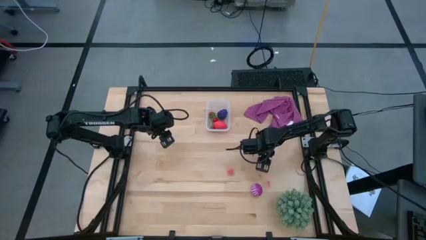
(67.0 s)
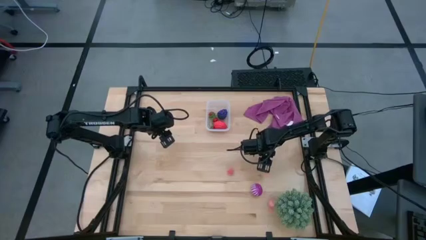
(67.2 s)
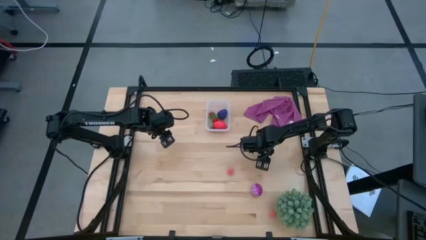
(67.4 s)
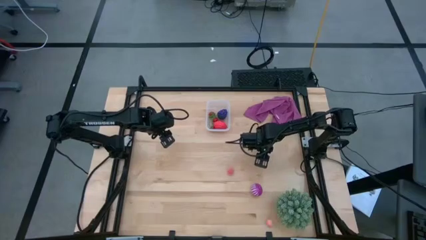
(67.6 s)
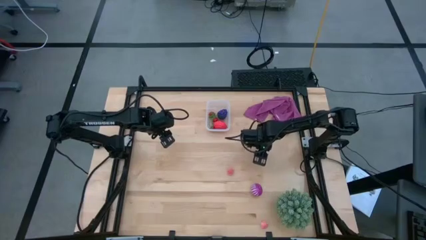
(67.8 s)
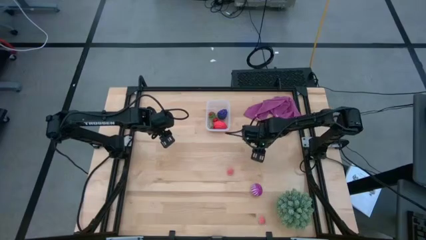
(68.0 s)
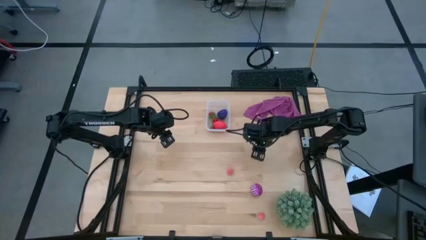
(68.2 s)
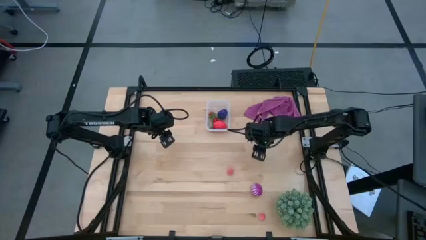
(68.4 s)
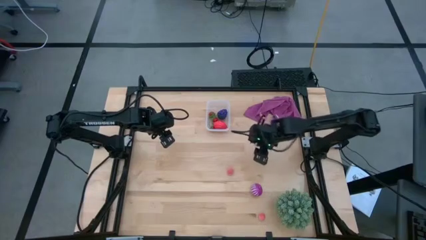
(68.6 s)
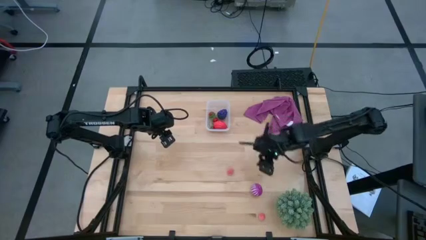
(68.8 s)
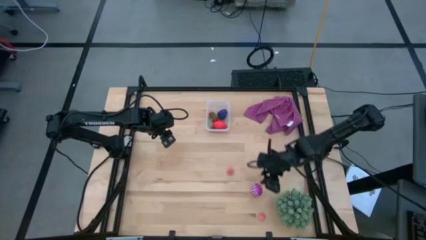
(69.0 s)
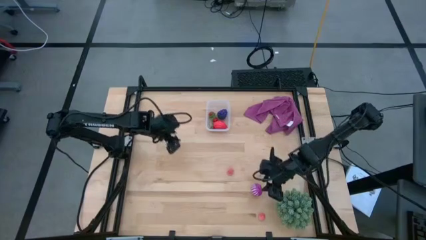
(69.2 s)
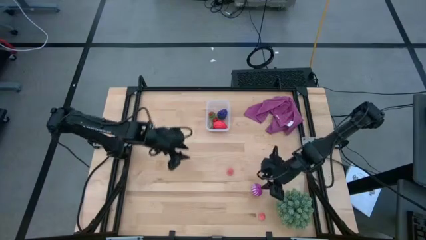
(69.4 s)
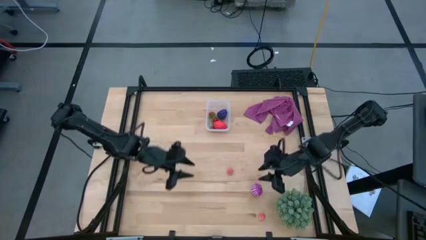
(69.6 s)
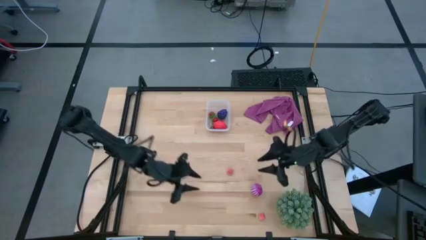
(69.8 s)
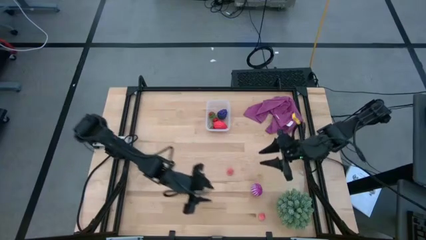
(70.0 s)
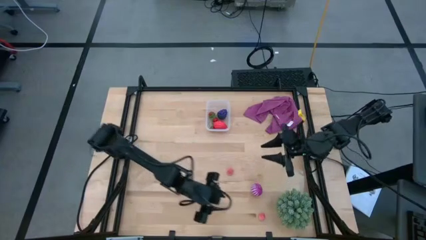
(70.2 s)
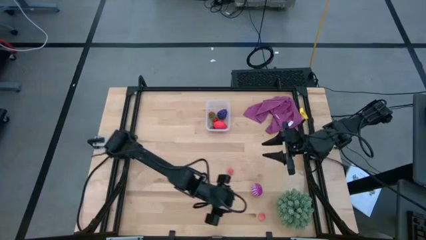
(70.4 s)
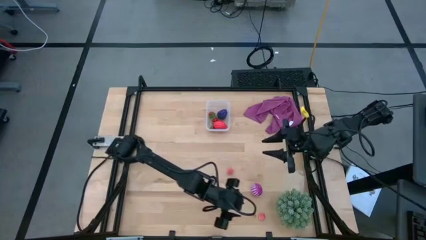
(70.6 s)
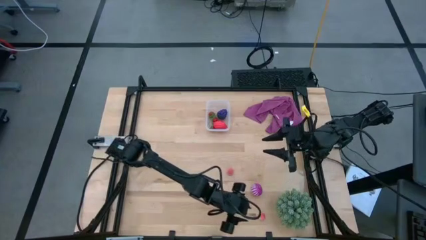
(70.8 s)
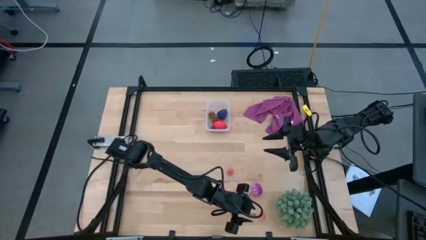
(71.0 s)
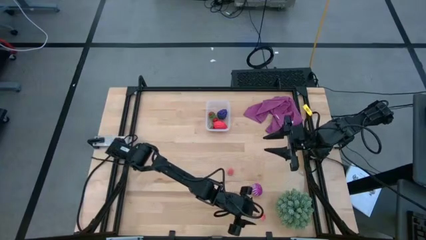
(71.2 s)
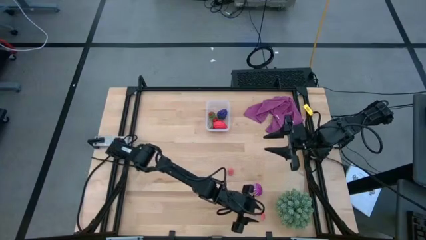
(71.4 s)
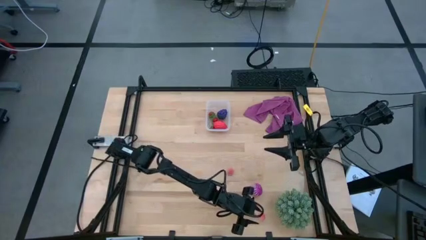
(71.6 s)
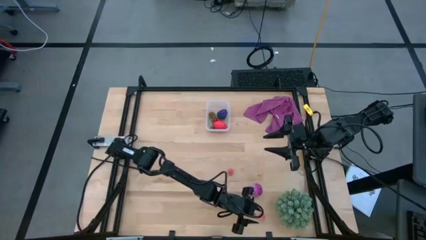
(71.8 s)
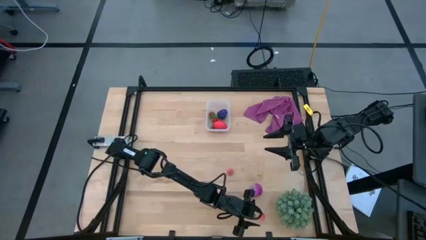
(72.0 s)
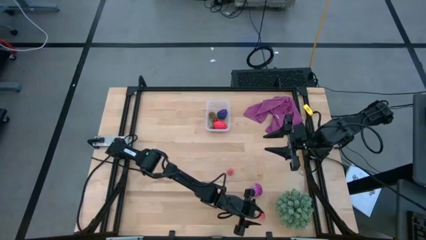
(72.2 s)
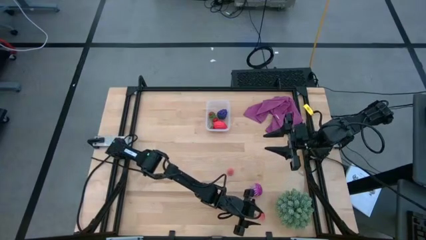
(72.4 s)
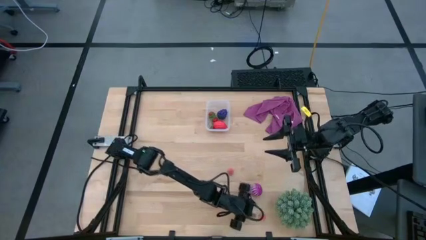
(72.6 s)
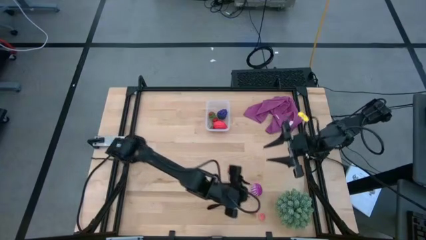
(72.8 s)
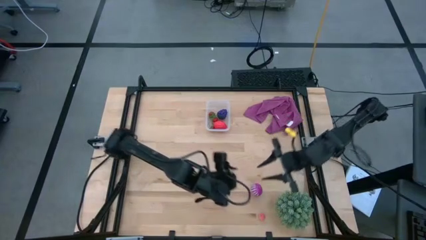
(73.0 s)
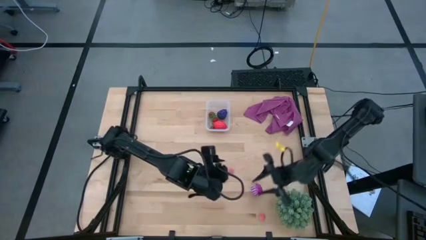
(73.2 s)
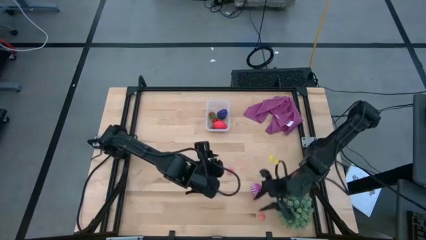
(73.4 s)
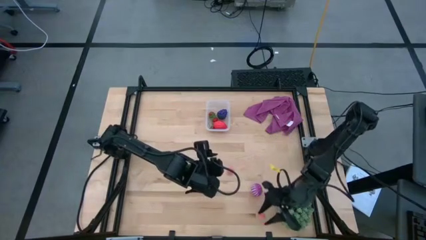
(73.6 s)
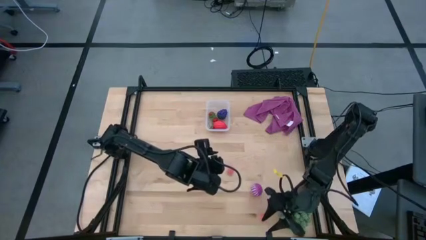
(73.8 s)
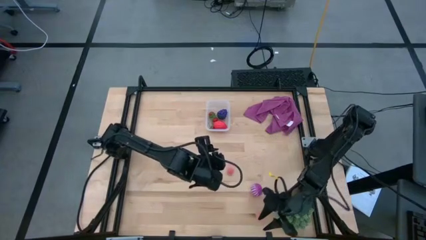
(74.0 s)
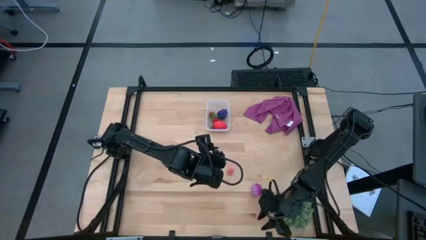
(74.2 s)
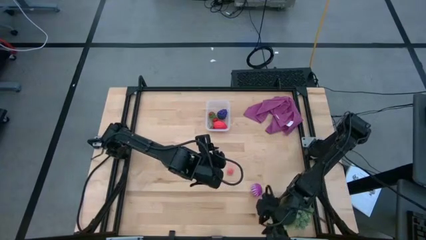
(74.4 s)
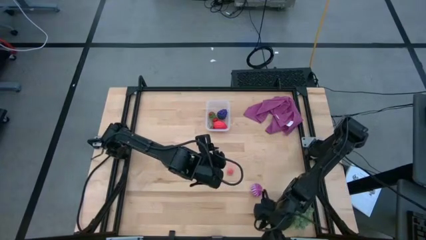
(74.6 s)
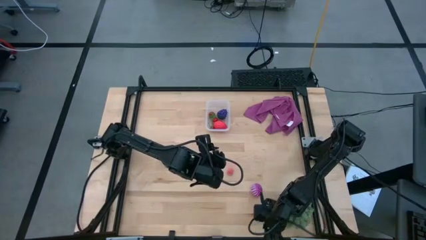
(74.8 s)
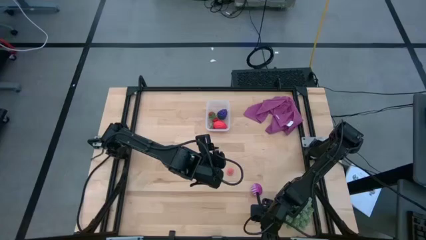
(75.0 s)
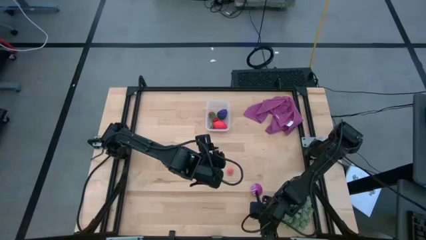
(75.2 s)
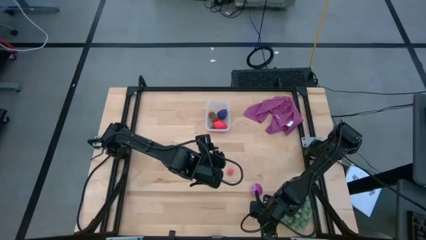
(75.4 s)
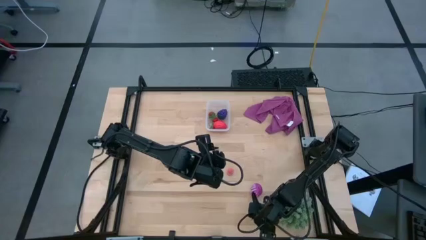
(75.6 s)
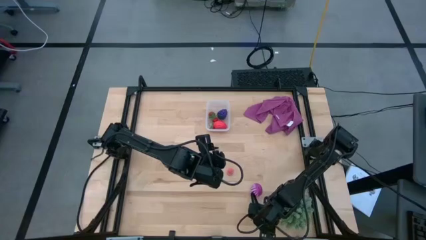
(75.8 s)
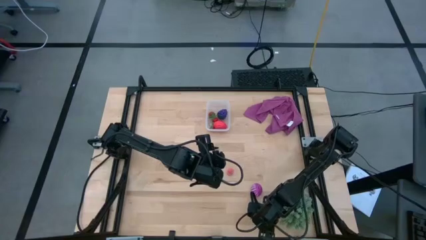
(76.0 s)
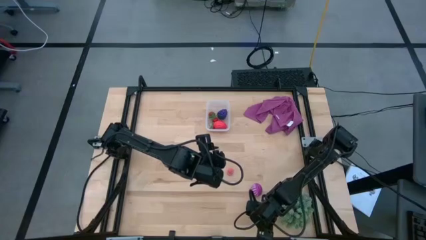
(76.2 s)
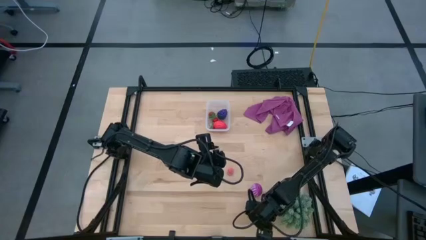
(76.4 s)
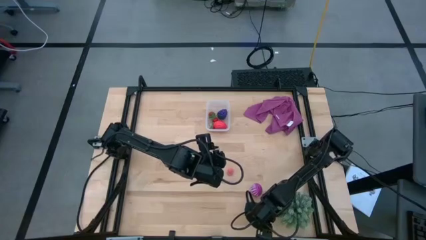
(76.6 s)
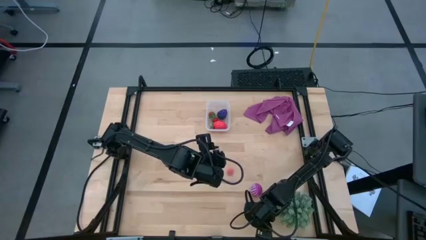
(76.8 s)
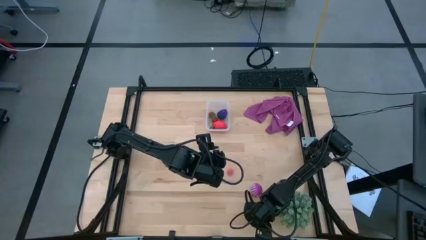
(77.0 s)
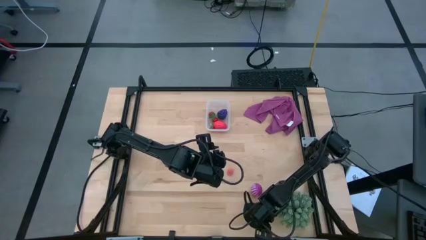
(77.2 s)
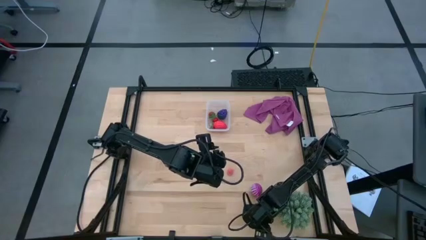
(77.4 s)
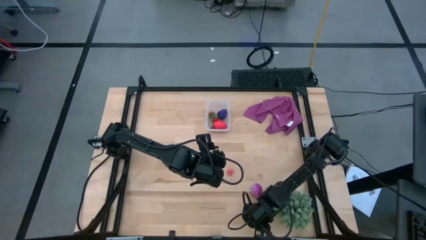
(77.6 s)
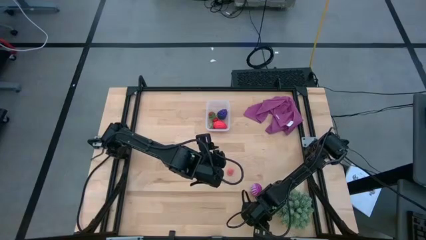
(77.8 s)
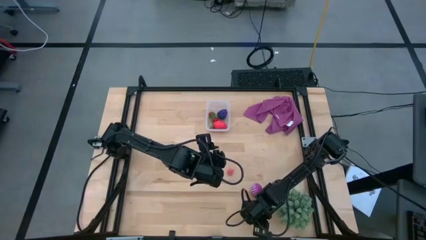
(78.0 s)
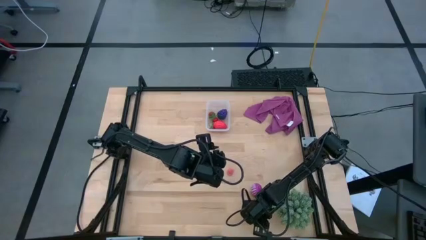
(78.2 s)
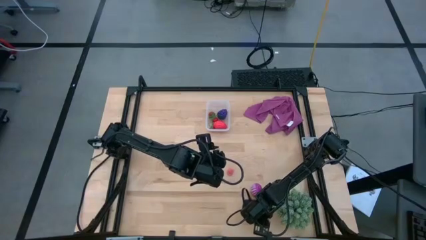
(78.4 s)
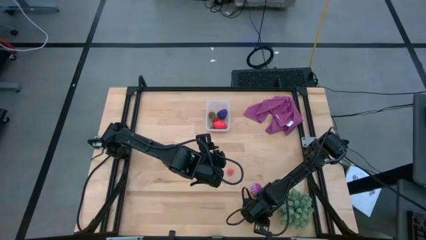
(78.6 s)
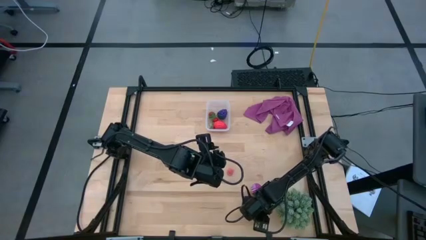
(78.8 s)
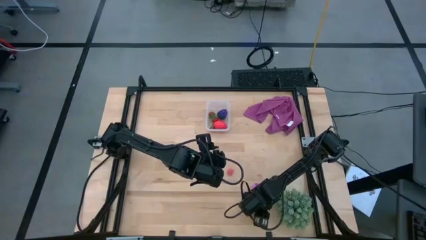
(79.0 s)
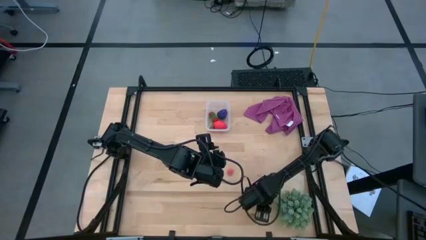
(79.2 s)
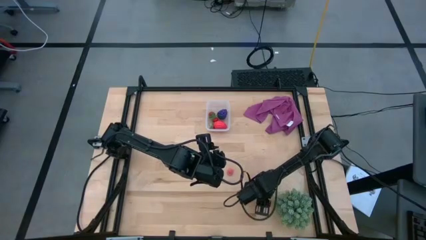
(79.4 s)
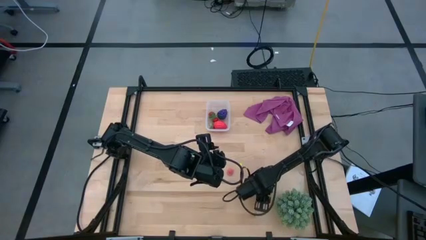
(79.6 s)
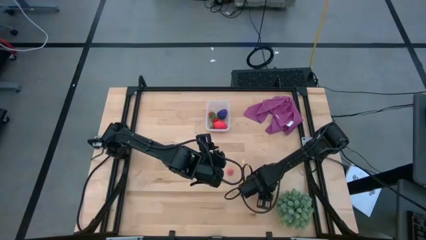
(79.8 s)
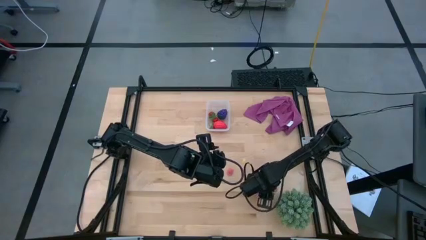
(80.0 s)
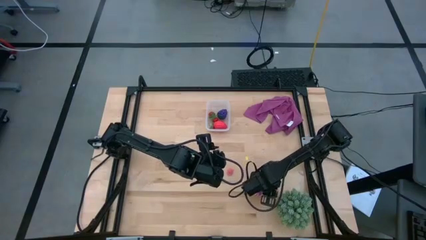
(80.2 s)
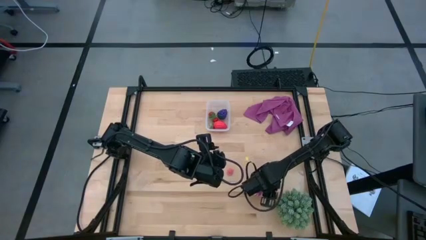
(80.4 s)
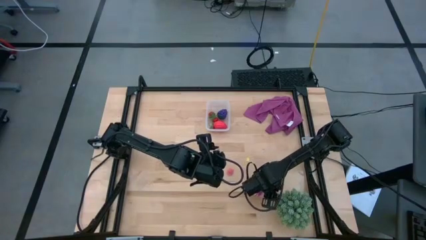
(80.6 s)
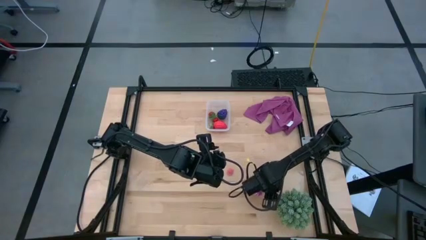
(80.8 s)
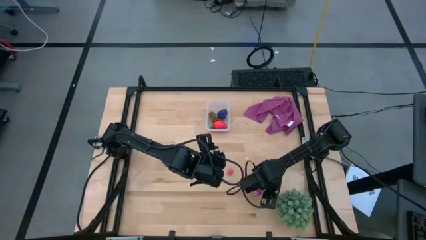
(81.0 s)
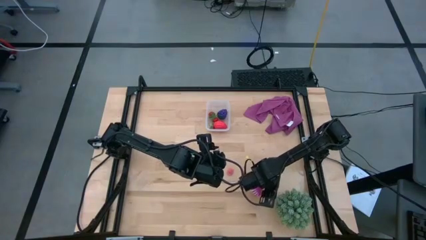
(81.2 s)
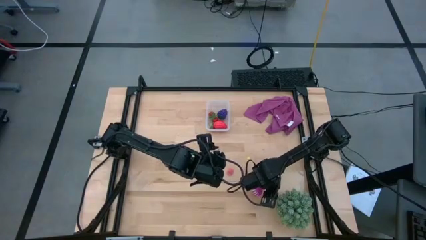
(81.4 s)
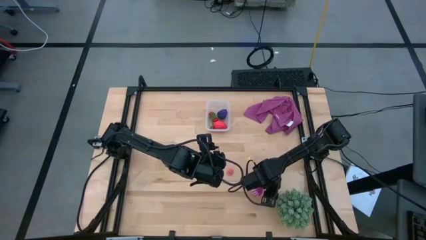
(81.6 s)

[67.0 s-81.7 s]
Task: Pick and placing Produce into tupperware
Put the bottom pink peach into the transparent bin

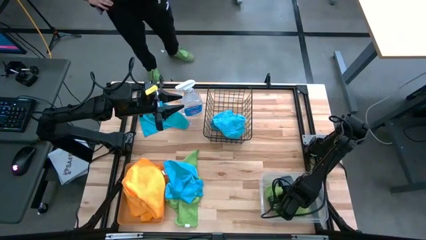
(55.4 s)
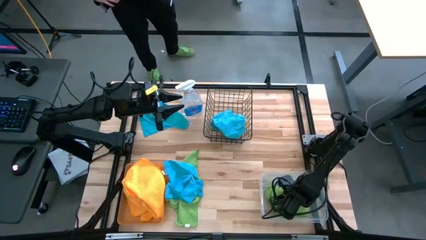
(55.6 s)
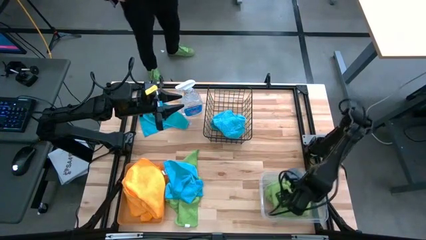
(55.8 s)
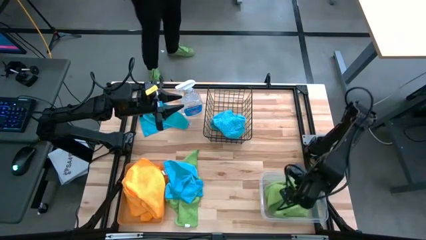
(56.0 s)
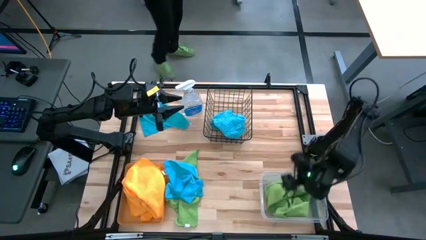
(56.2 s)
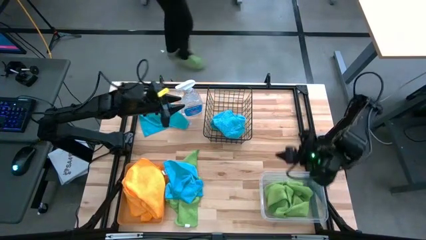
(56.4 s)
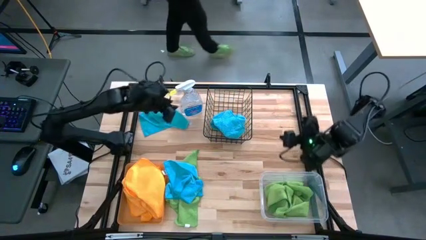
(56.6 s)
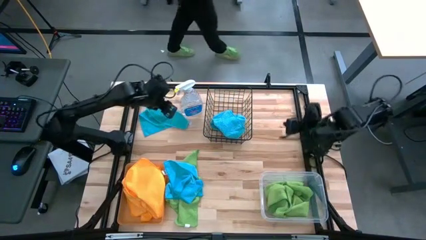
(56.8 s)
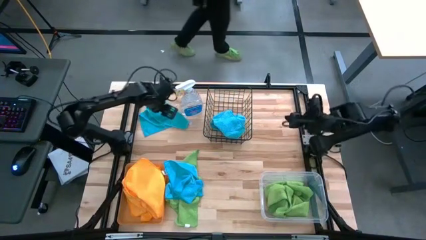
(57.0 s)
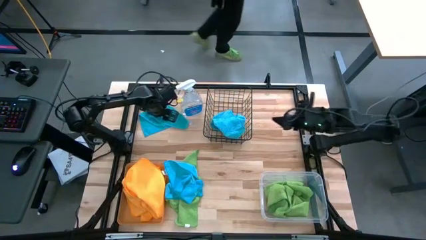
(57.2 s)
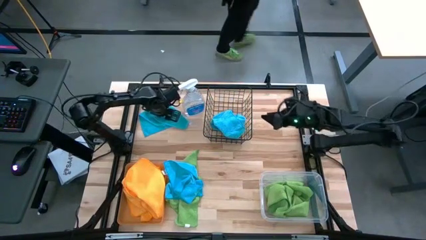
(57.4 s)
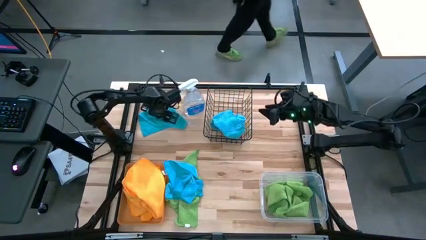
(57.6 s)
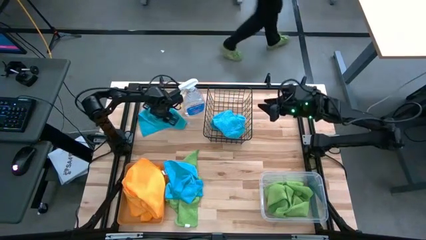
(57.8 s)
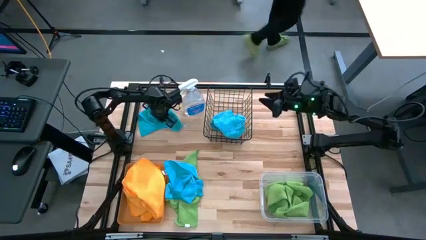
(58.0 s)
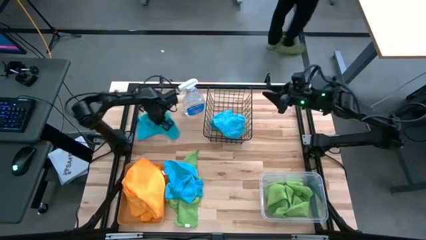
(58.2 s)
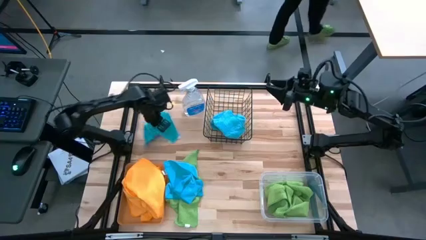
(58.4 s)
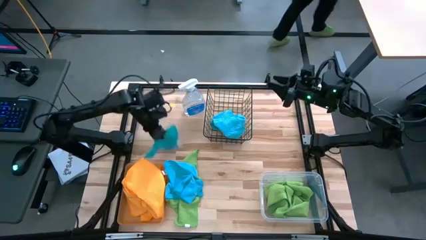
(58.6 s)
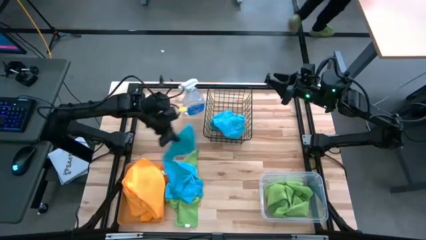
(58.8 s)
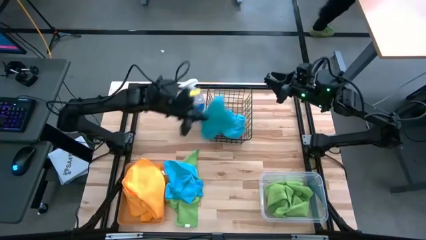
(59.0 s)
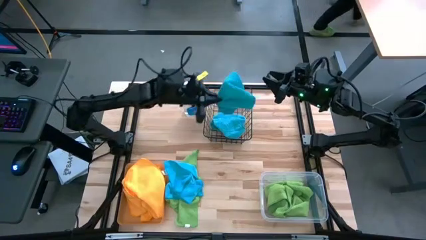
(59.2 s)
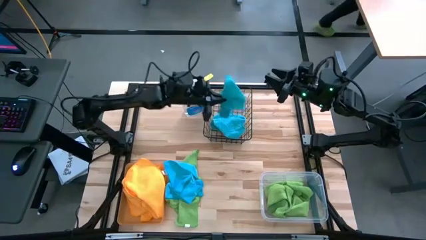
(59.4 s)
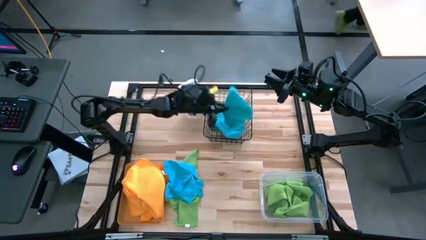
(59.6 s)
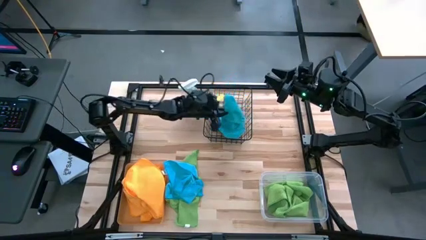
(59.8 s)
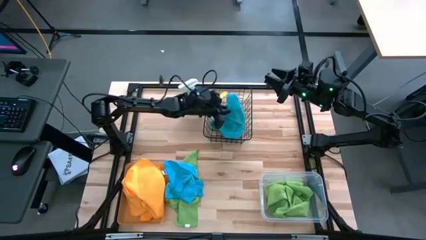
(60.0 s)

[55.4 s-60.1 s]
Task: Sort microfiber towel by color & place in baskets
Put the top blue towel into the wire basket
